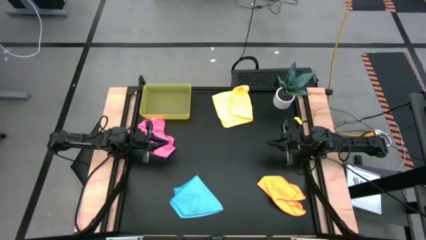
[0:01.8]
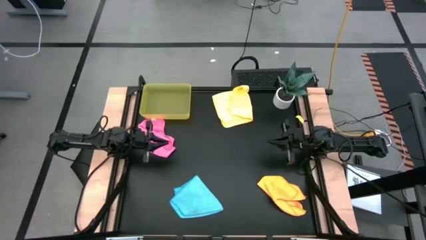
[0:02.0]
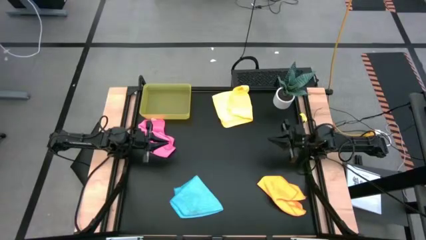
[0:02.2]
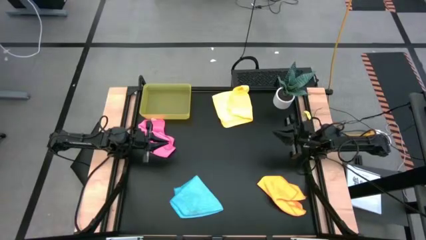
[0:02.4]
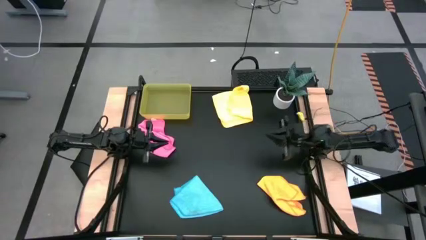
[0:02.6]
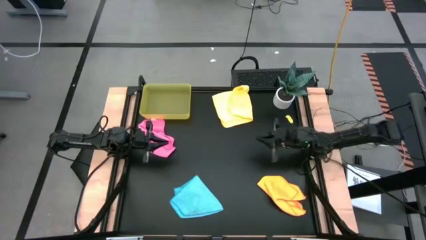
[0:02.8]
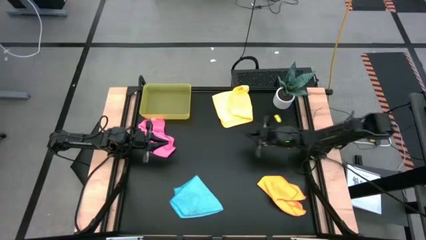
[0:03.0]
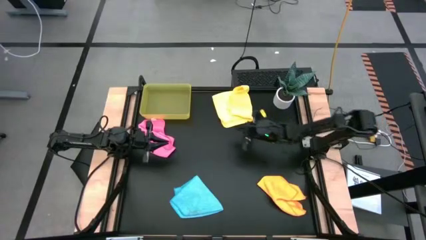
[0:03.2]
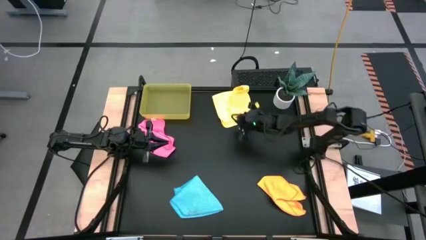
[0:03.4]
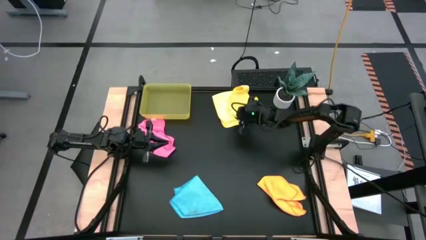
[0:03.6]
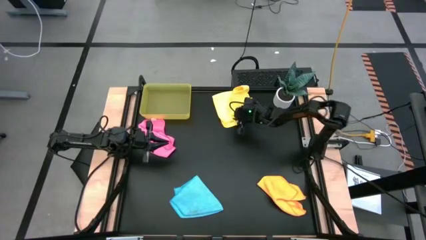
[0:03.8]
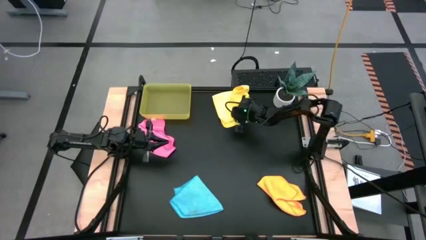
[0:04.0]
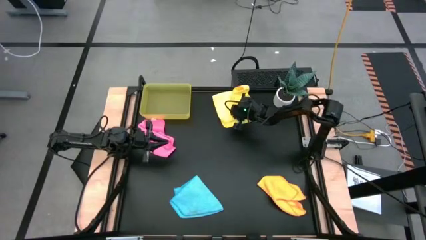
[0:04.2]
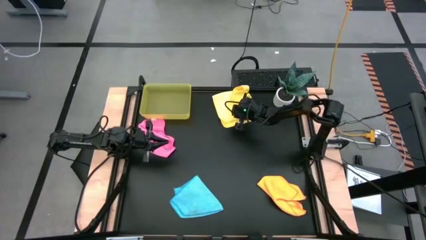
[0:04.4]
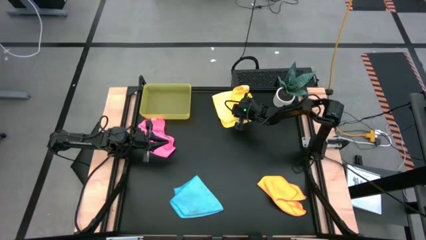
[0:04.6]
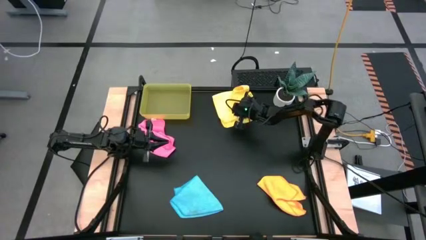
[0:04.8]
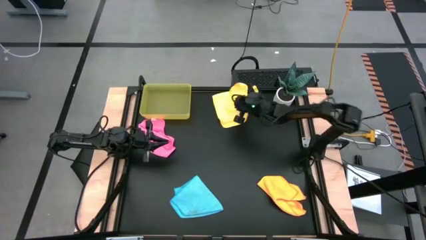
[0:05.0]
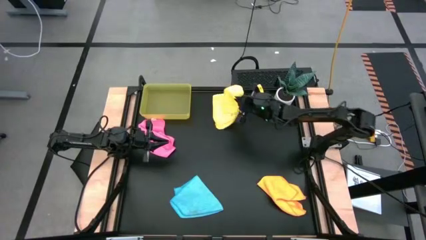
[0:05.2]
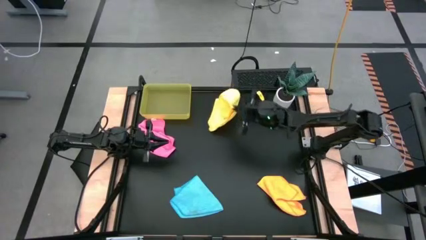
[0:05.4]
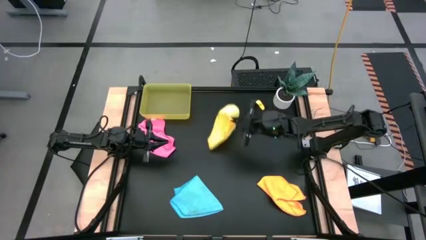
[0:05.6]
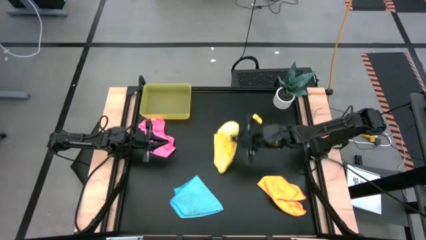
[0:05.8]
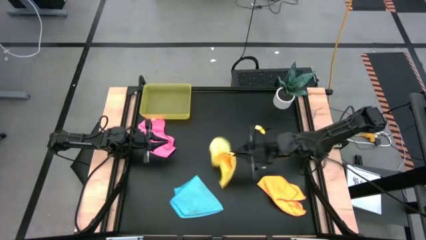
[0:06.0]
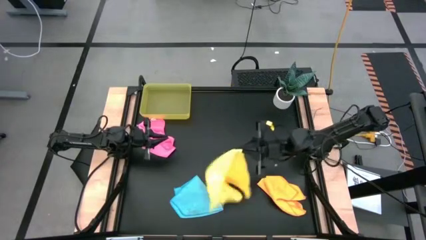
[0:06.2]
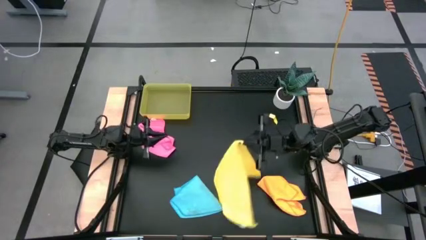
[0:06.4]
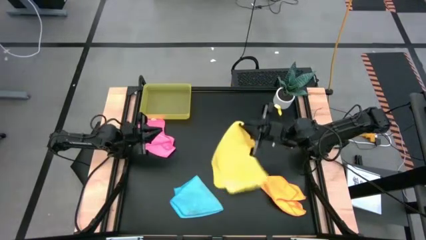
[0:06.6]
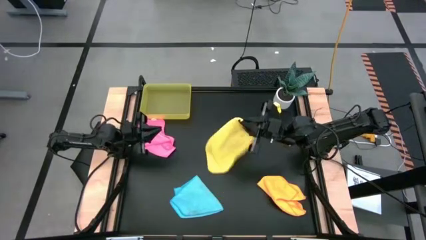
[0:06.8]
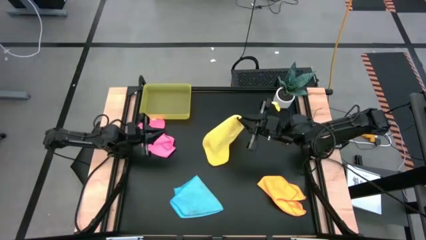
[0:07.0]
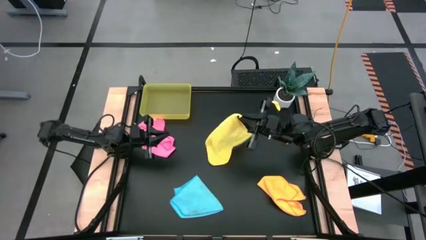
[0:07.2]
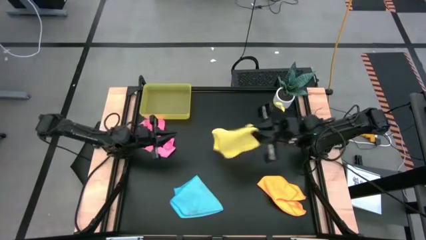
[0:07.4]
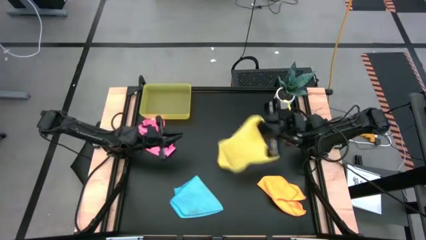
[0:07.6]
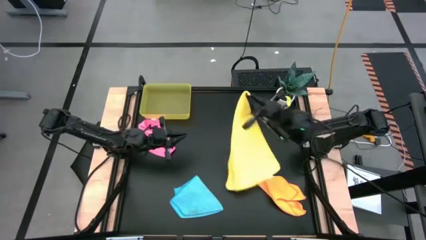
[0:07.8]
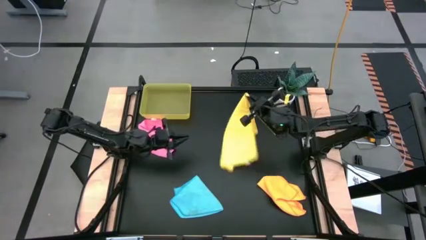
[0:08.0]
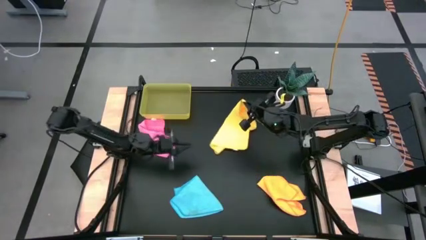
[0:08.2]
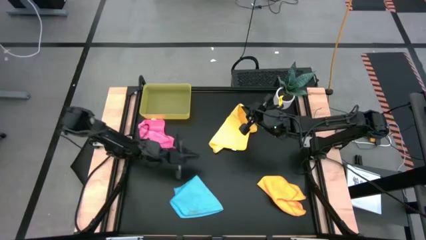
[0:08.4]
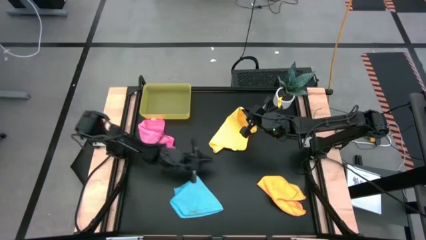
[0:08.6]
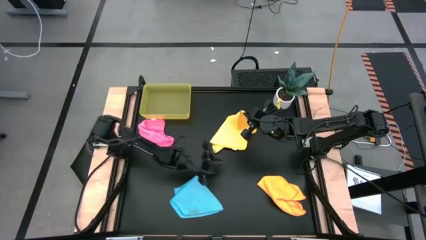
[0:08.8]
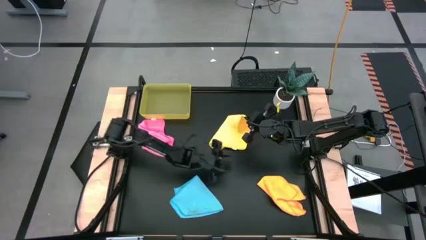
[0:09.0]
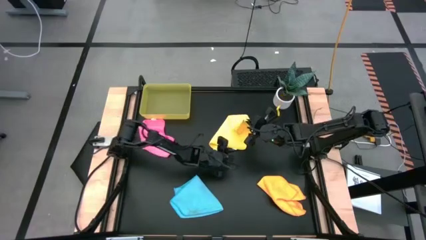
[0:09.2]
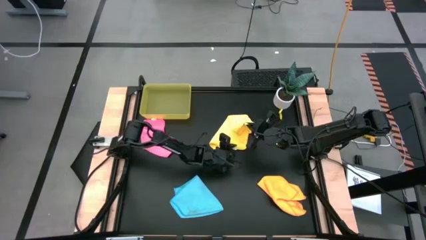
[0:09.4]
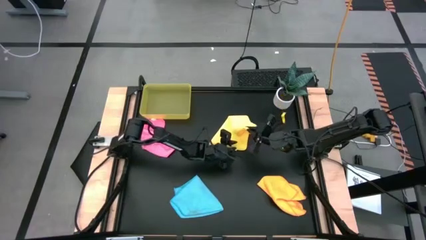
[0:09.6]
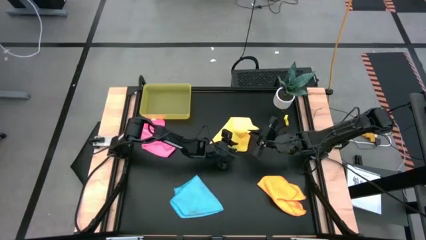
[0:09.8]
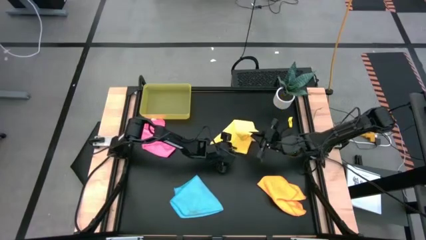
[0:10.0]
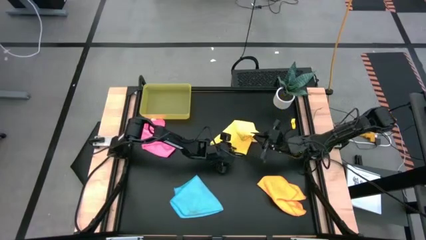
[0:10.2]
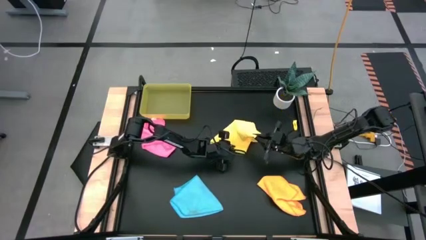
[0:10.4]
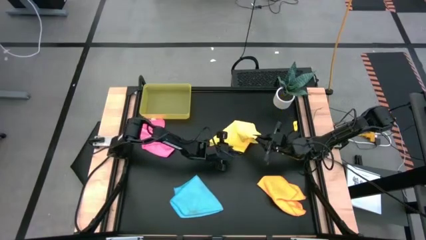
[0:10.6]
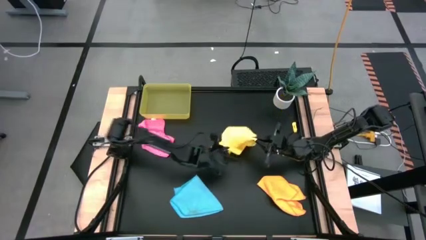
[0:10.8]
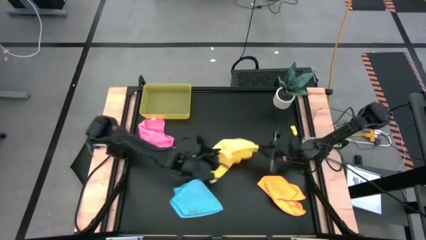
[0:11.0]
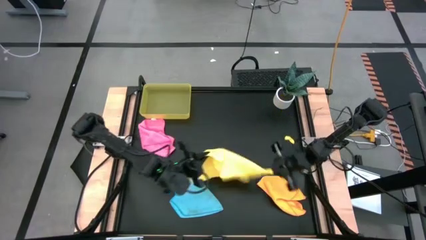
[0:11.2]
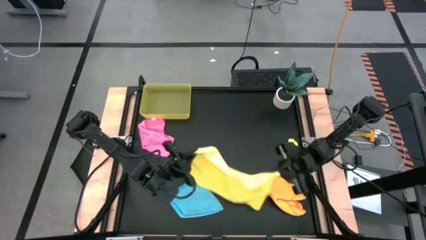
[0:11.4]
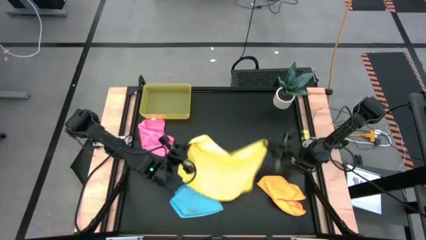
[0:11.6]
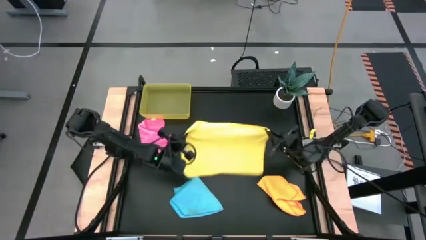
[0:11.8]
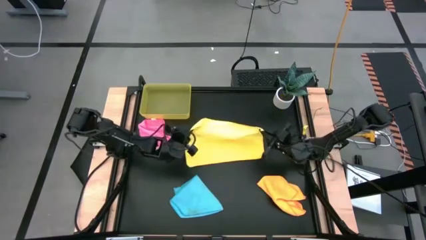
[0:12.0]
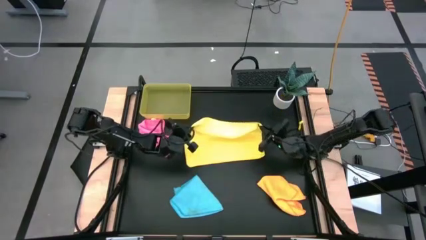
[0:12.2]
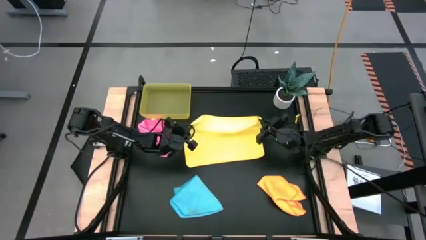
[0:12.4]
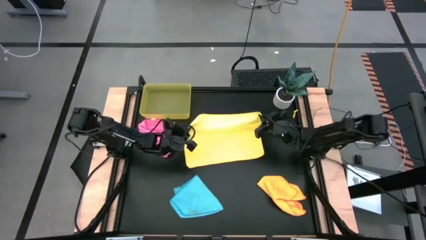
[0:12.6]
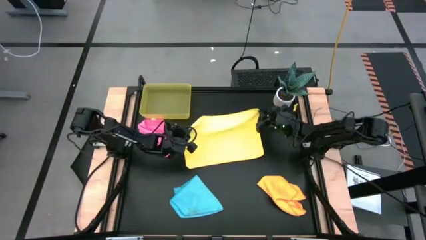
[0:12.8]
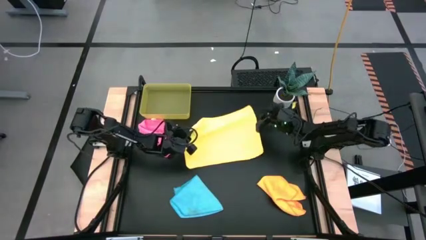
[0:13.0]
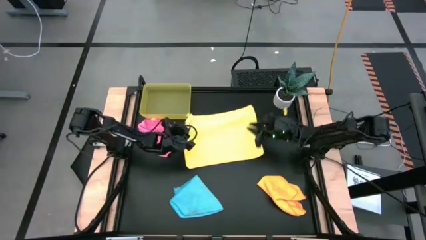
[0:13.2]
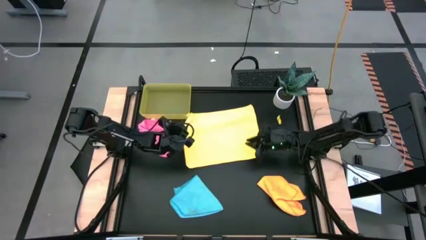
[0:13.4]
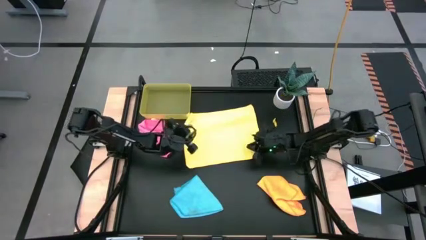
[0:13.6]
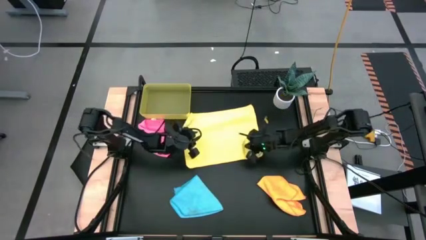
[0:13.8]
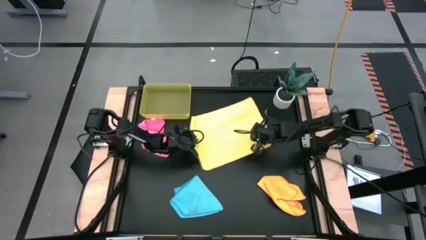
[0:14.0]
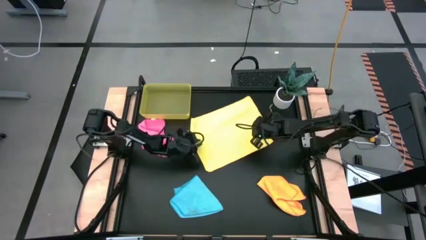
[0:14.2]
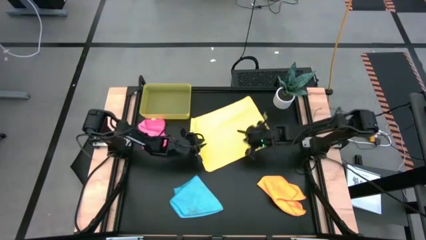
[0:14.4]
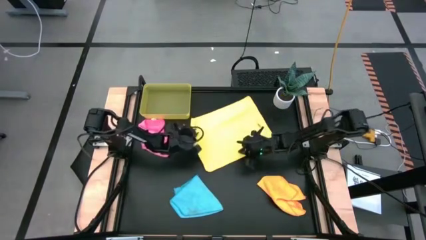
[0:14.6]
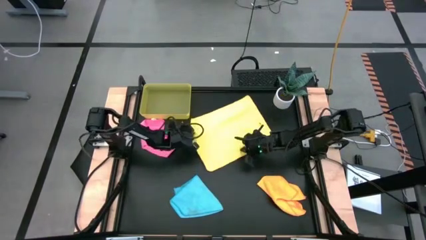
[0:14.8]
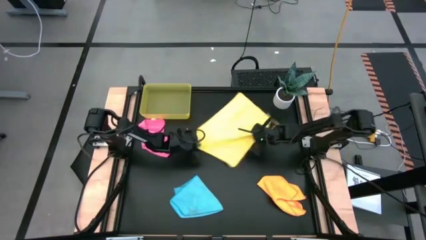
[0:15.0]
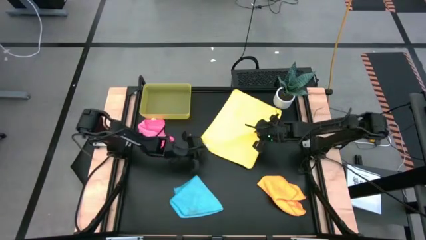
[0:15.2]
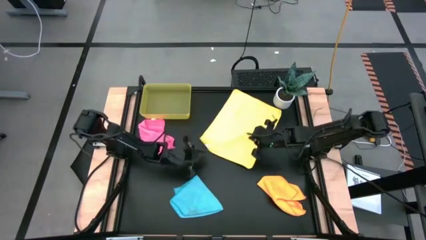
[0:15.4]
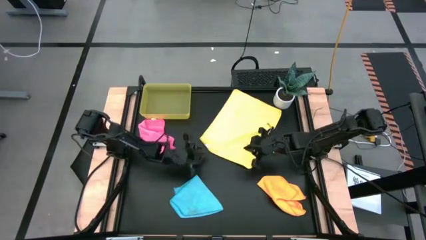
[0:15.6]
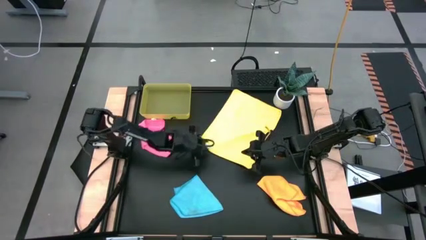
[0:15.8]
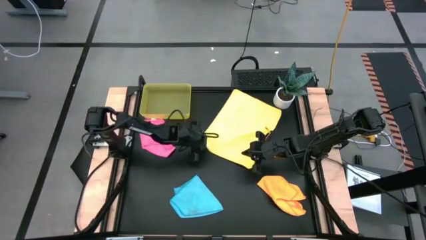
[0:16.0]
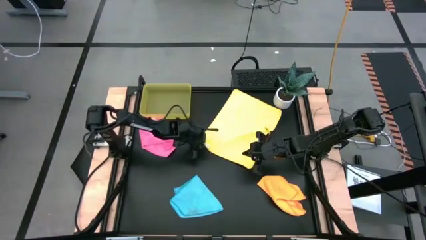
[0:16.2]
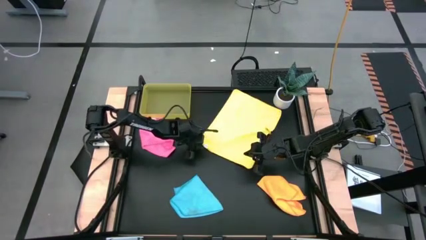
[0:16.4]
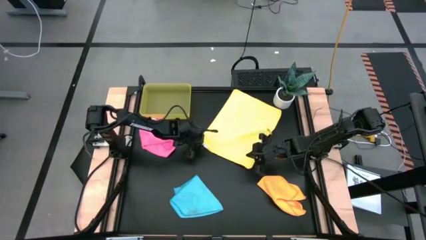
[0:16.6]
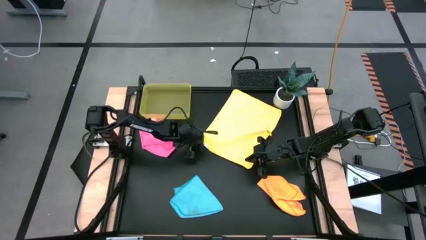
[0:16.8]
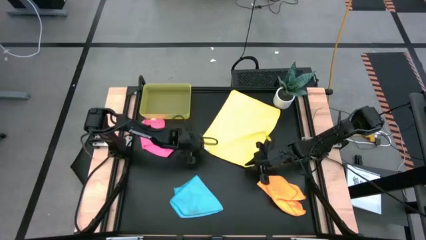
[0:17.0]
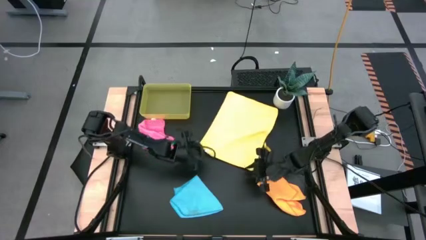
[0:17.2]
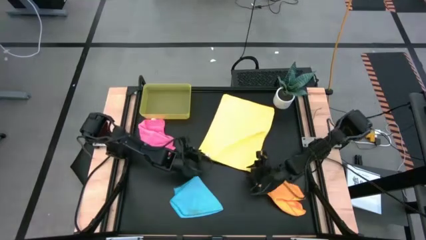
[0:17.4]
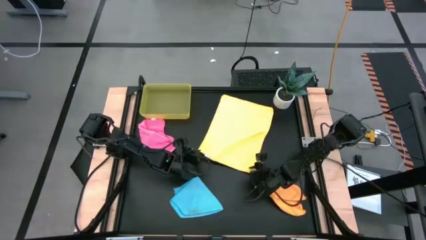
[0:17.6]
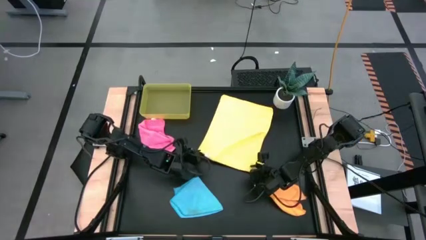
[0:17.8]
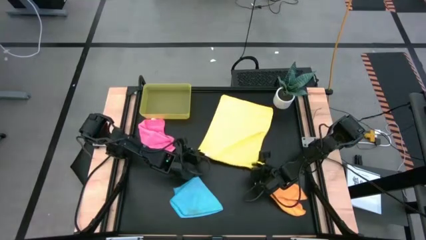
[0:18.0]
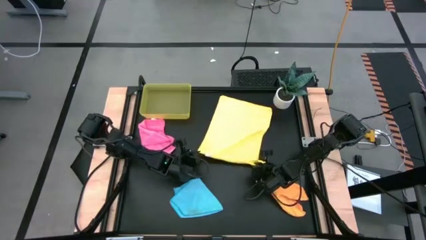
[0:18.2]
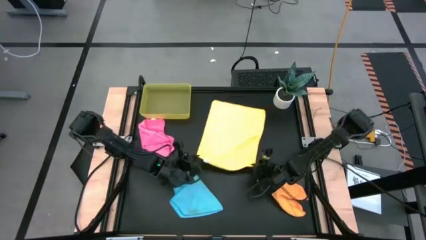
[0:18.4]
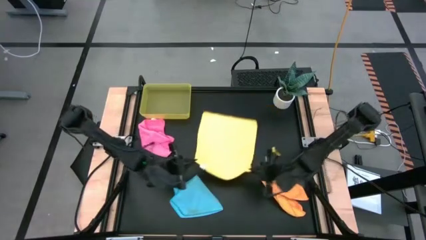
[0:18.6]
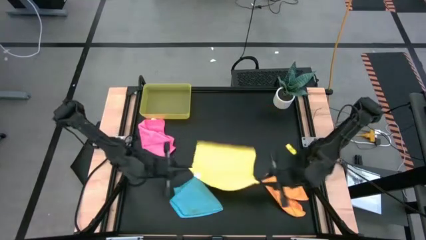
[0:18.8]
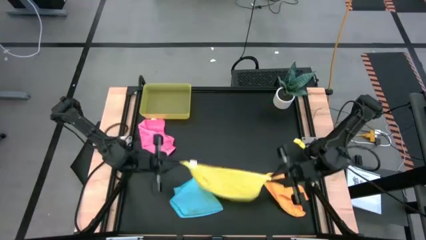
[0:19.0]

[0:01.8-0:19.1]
Task: Fold microfiber towels
Fold the yellow microfiber cloth
